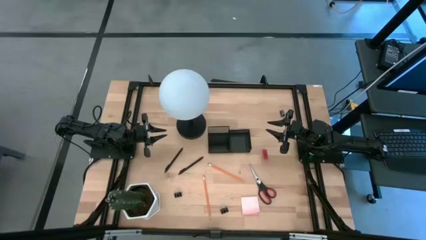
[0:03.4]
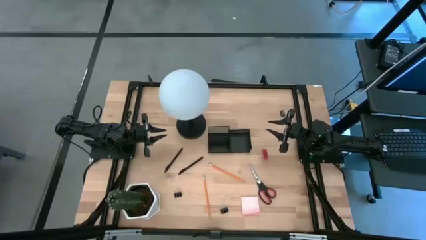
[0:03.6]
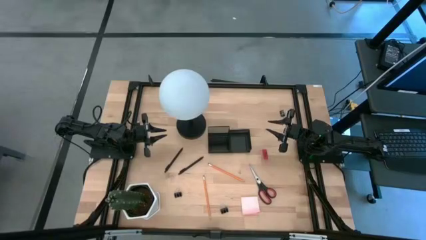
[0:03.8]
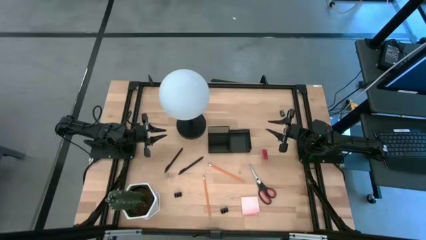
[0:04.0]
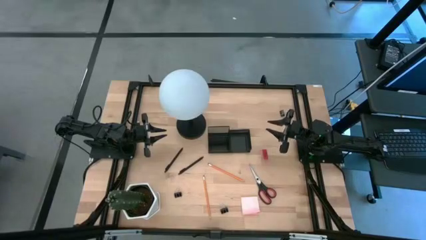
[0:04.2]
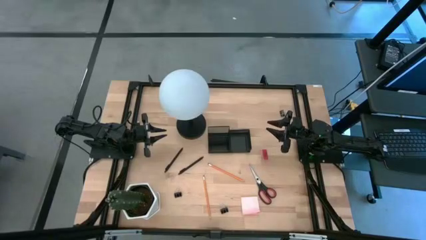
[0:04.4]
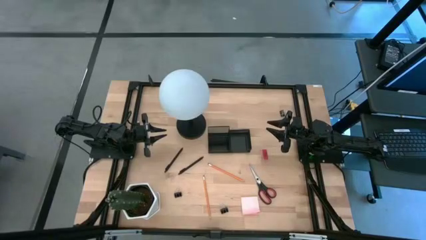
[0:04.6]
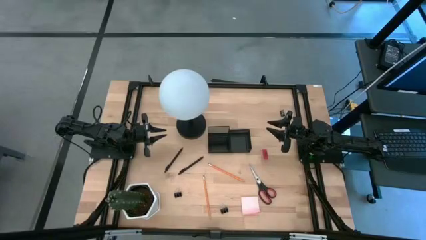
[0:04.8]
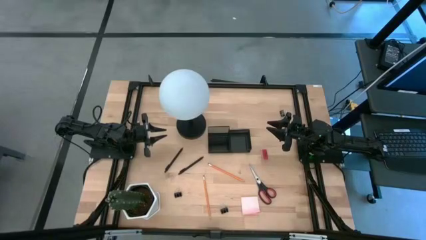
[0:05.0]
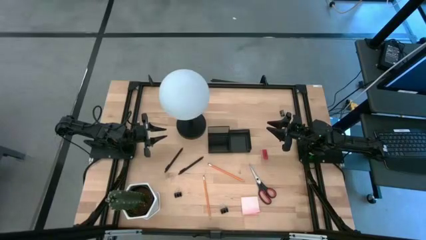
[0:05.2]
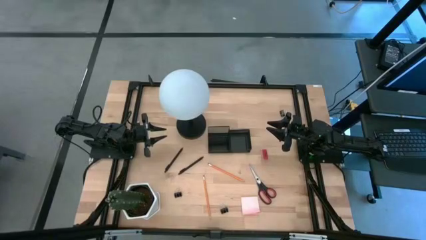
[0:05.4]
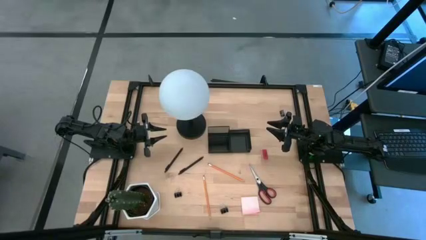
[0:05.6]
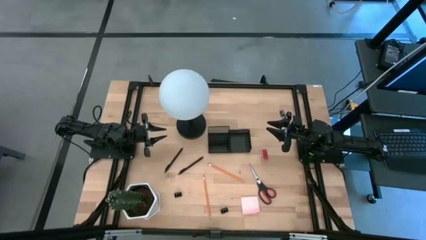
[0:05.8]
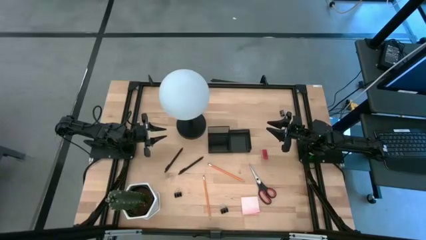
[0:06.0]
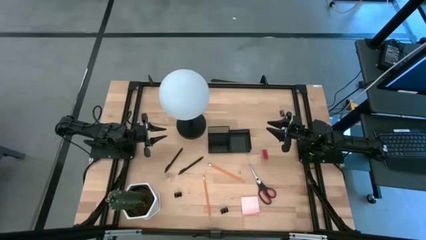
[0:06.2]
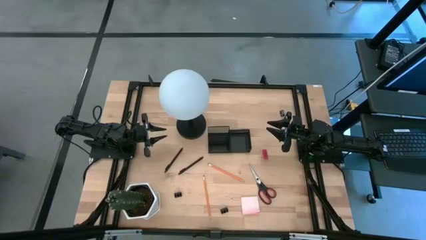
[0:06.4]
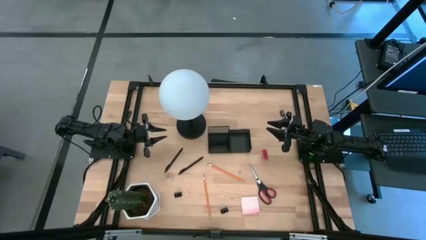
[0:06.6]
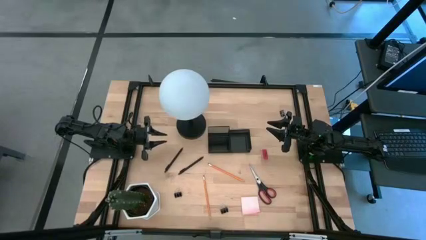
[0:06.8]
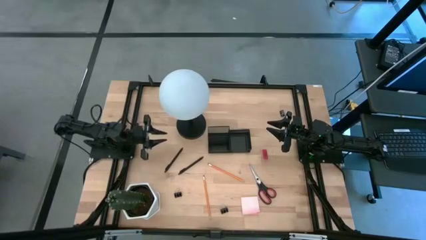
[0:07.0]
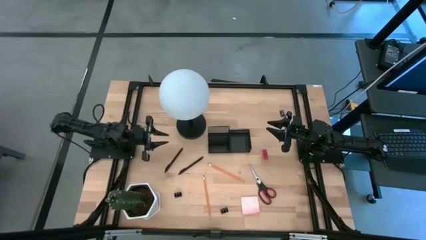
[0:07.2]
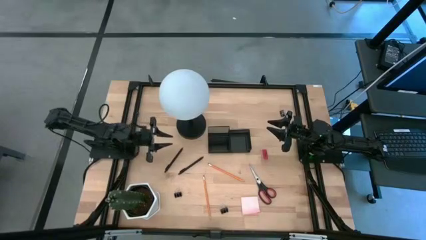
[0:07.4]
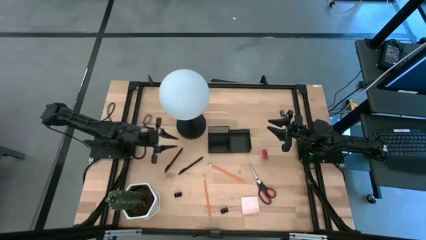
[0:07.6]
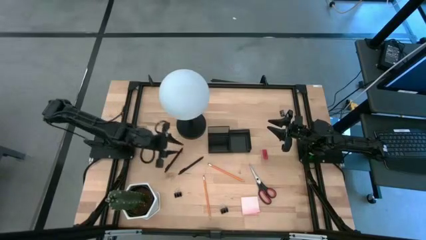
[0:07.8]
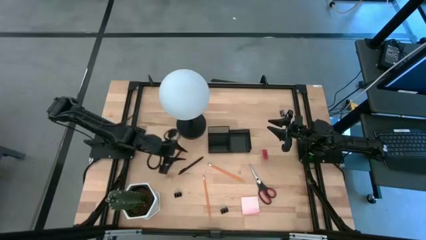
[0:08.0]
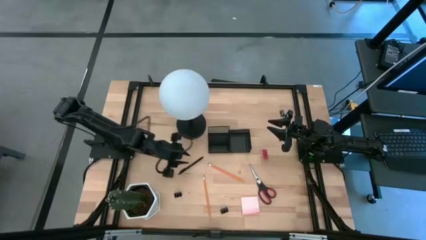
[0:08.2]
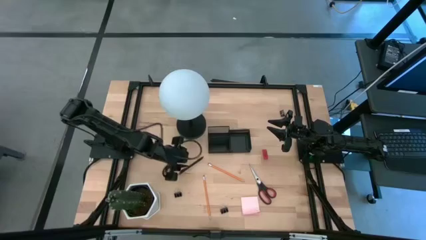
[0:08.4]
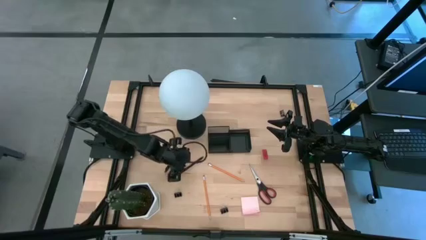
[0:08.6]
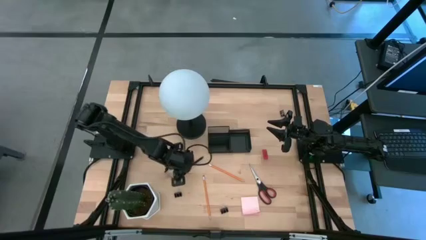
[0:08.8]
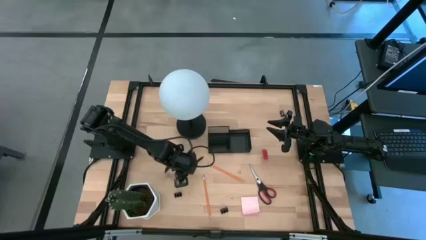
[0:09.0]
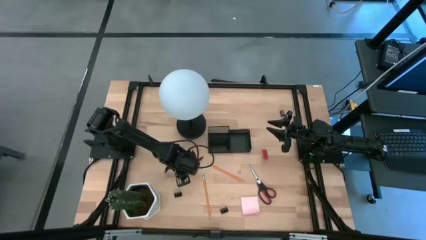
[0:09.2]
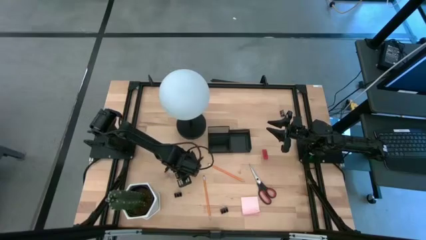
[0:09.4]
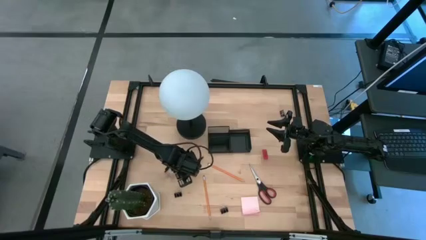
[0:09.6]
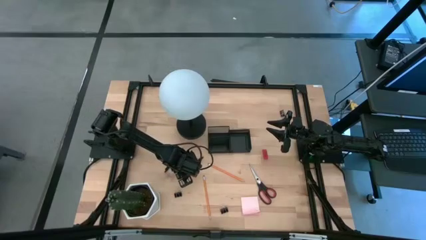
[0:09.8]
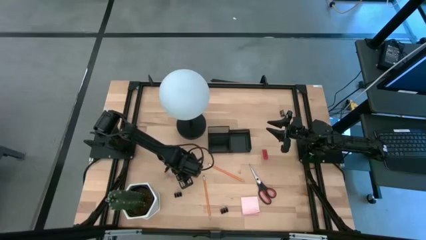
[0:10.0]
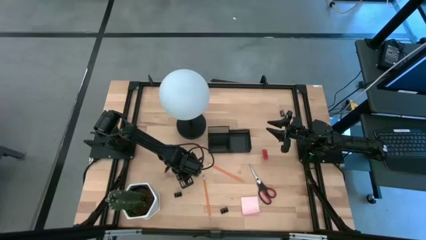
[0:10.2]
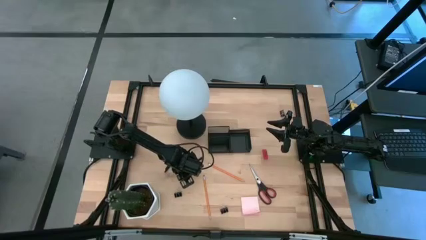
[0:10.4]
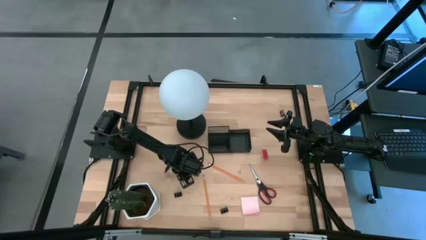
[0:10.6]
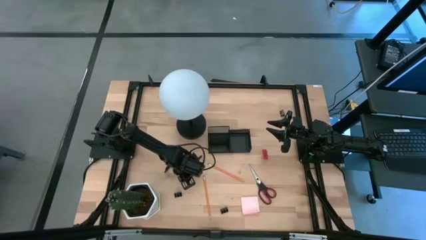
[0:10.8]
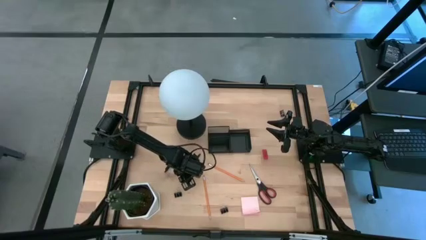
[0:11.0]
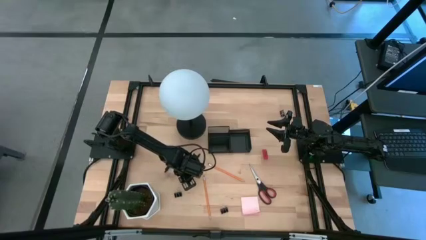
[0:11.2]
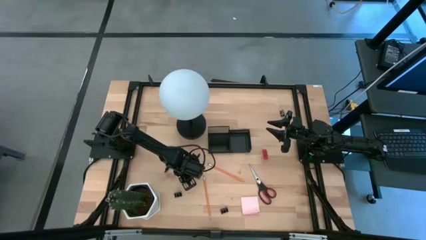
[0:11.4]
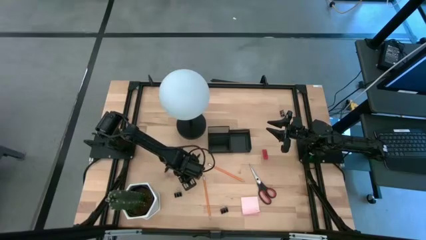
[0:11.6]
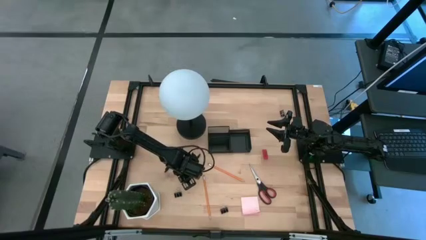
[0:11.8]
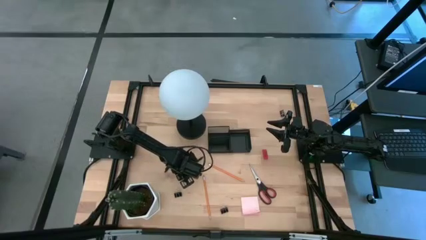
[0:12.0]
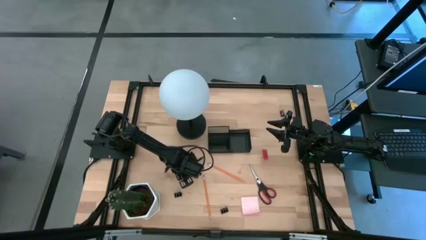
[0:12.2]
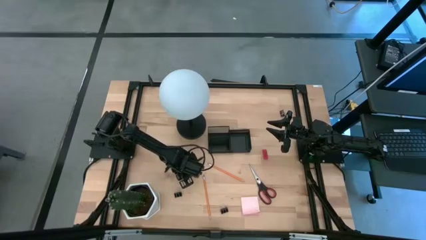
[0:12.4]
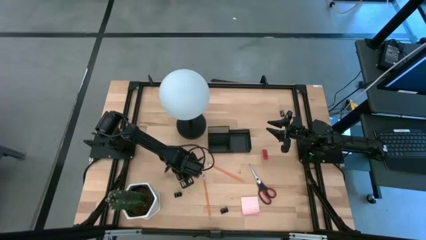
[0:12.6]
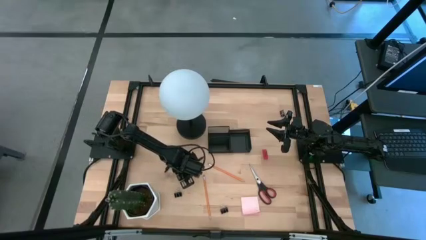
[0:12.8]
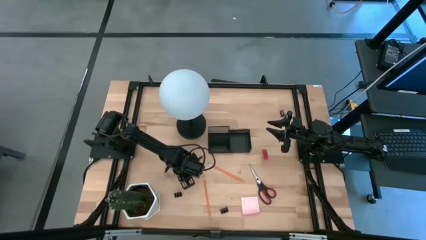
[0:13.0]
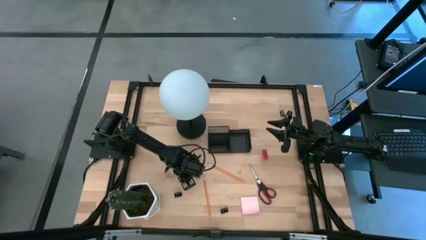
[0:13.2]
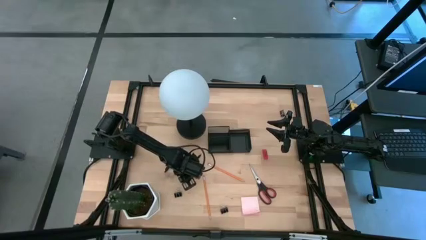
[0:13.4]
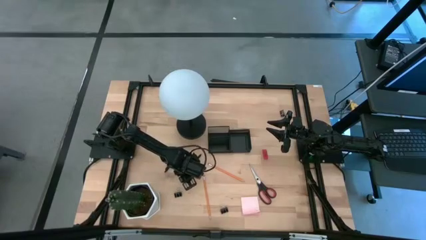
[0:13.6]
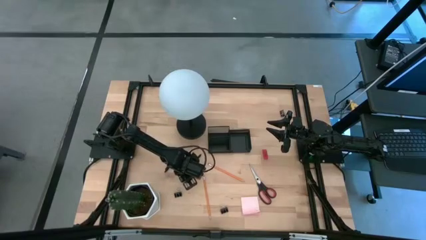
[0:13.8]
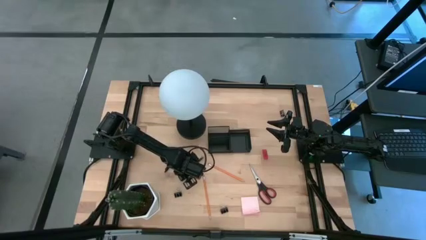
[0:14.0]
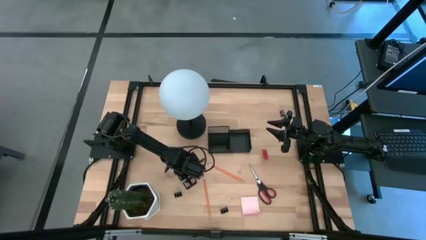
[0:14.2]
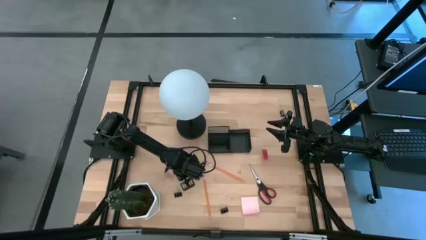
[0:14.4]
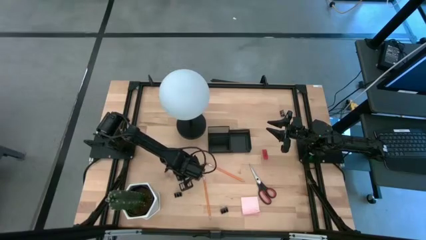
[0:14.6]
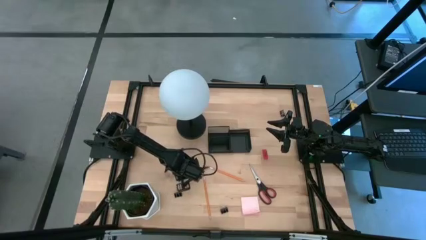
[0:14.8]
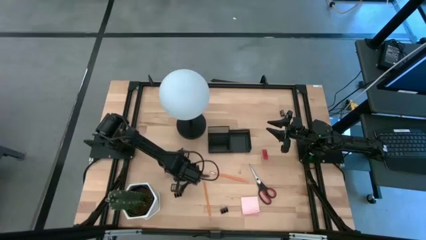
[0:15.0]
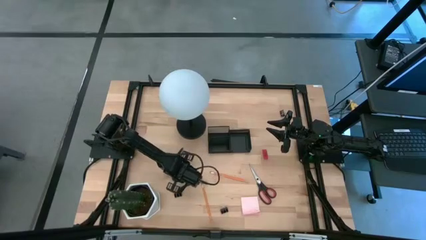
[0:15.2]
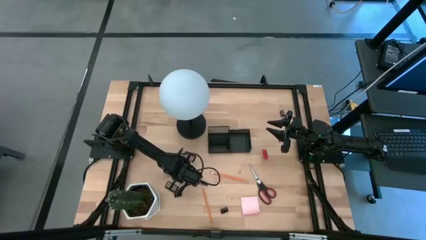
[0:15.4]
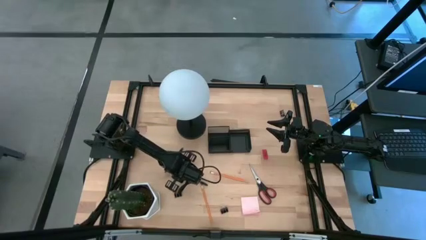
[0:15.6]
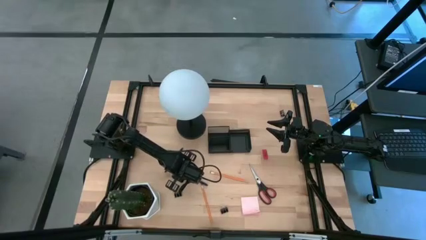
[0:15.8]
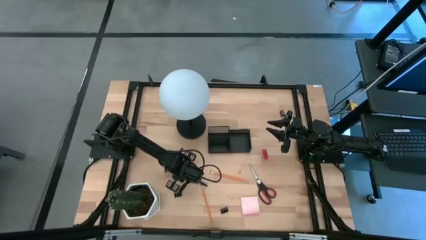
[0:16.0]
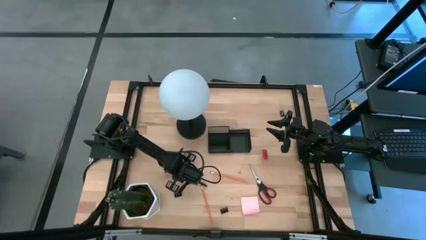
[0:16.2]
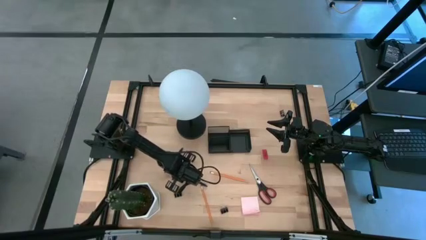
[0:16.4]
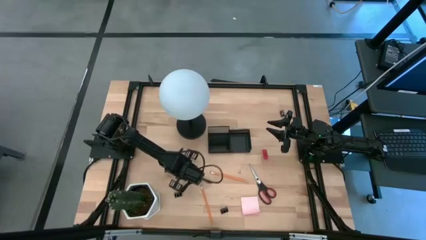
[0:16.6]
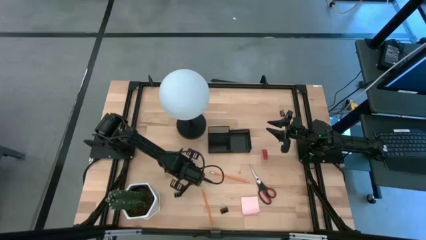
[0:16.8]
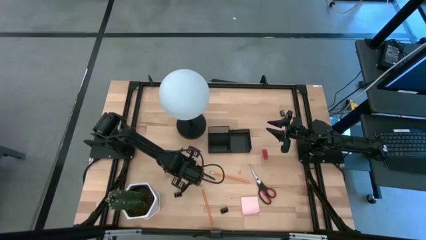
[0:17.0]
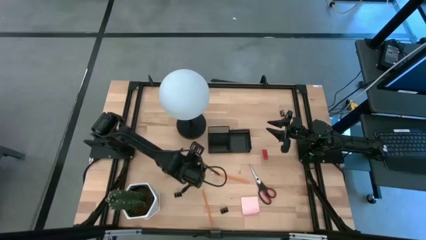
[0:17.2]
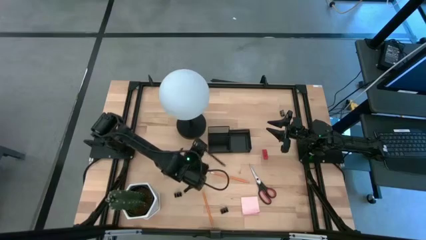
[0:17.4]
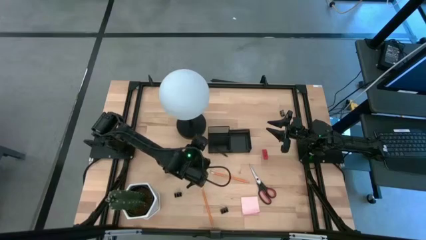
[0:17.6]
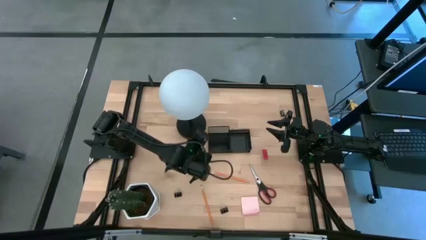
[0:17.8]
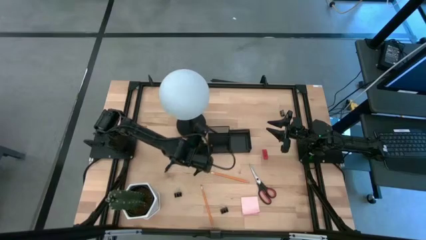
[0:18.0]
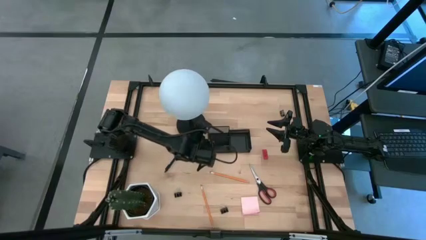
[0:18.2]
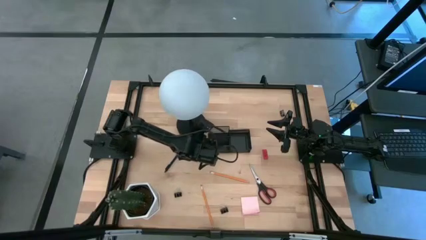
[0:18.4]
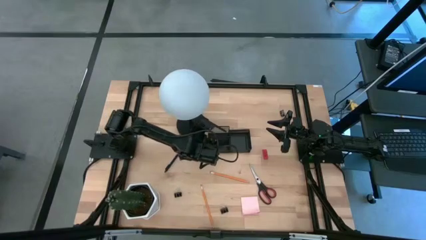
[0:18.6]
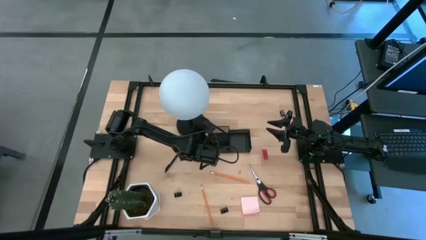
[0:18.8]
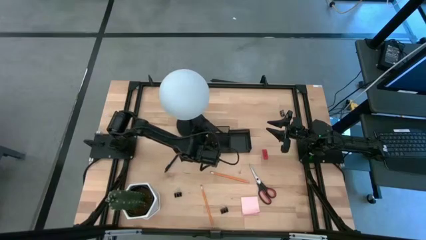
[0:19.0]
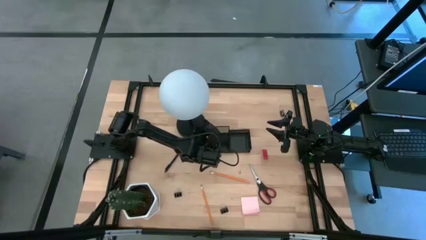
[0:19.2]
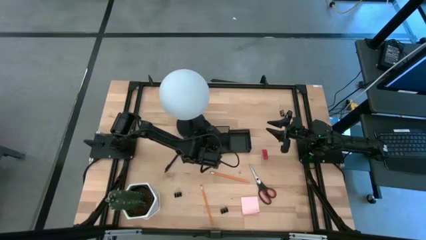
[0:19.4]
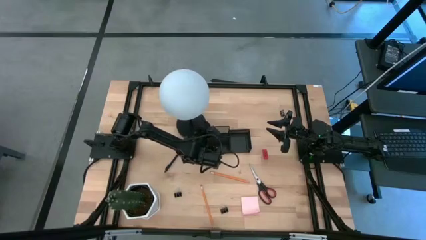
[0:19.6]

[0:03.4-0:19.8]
Task: Pick and place office supplies into organizer
Put the right black pen into the black desk organizer
